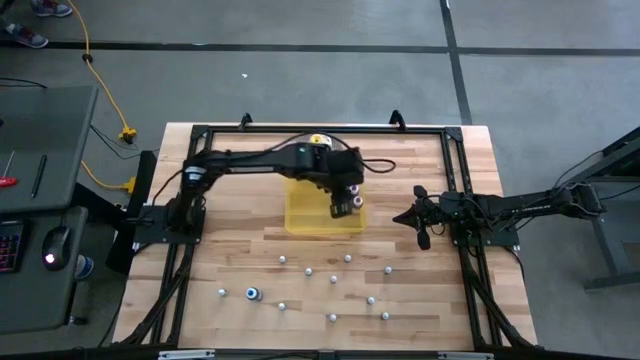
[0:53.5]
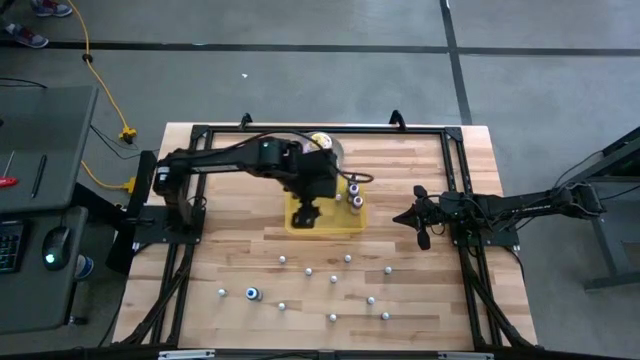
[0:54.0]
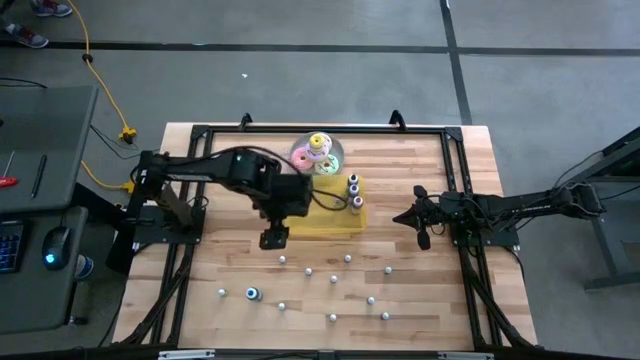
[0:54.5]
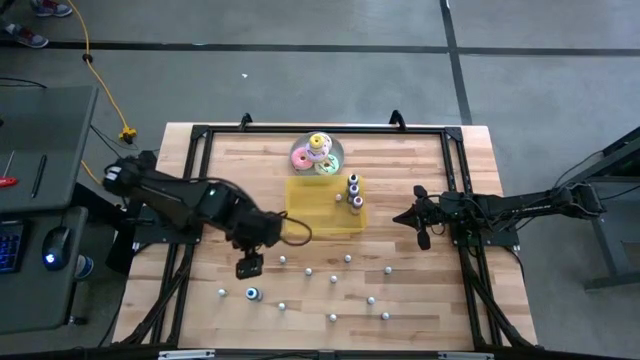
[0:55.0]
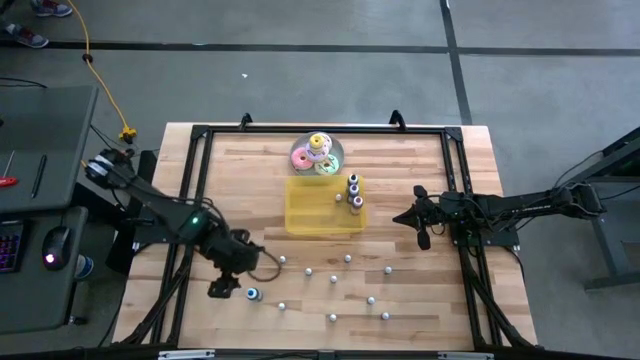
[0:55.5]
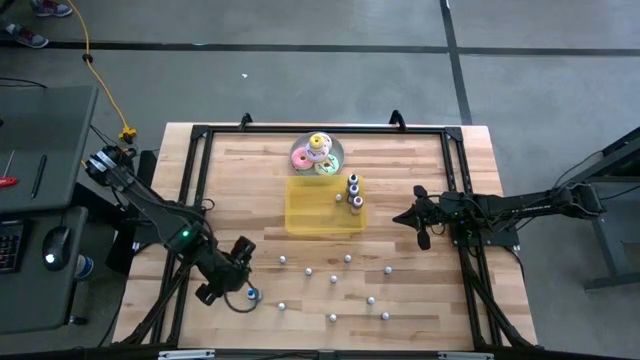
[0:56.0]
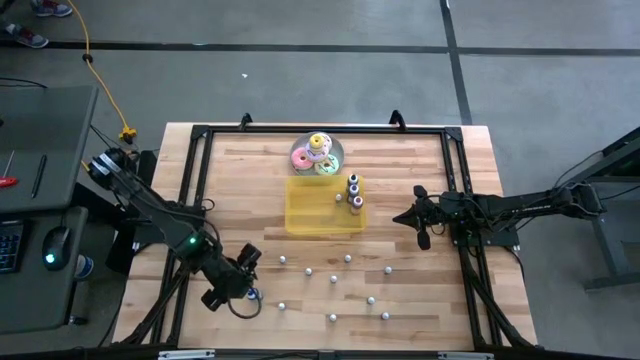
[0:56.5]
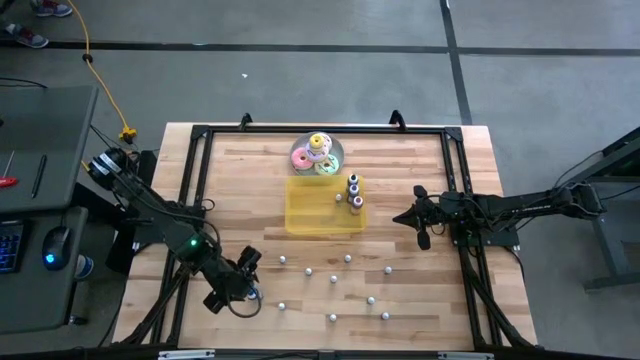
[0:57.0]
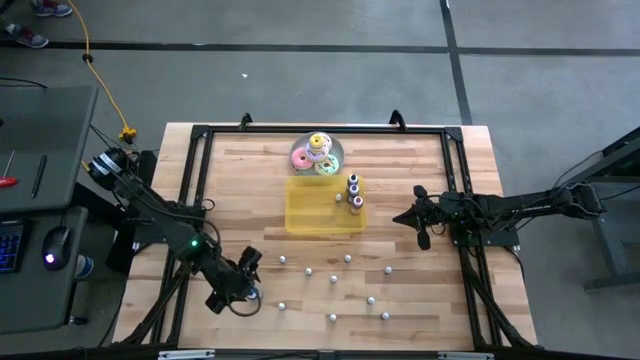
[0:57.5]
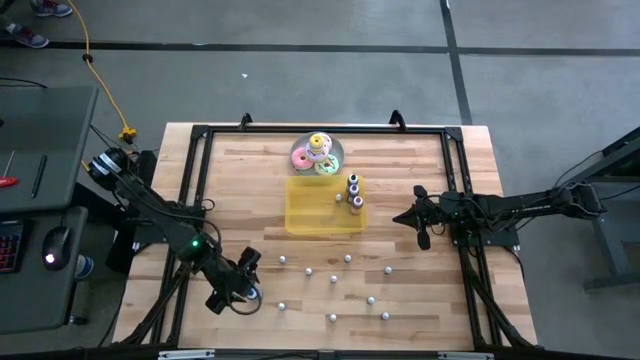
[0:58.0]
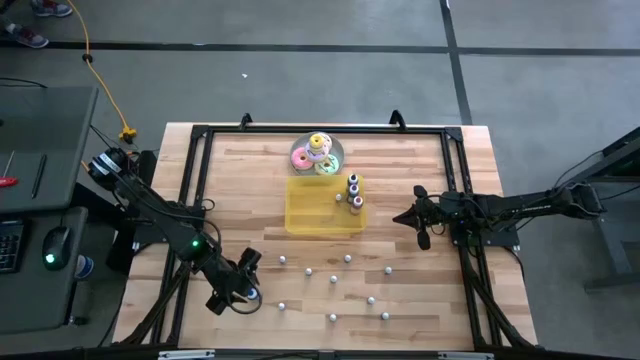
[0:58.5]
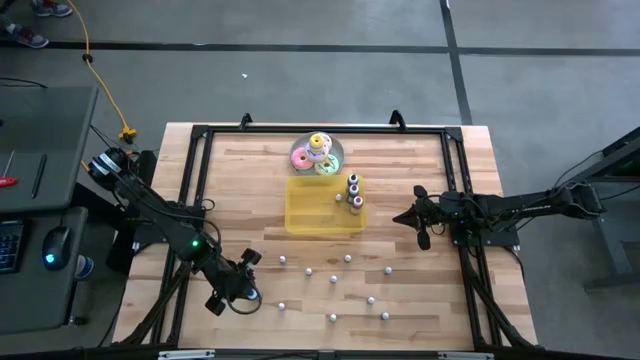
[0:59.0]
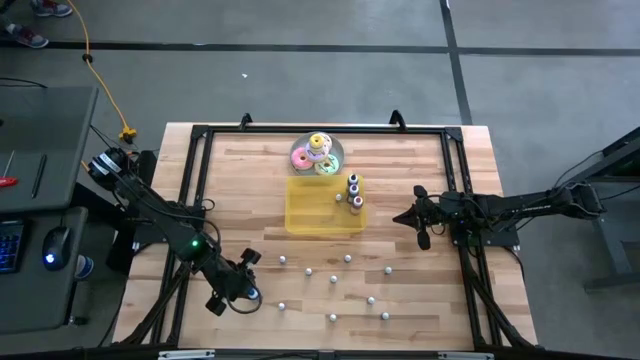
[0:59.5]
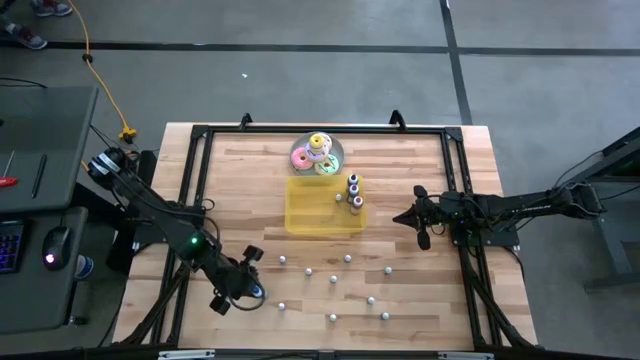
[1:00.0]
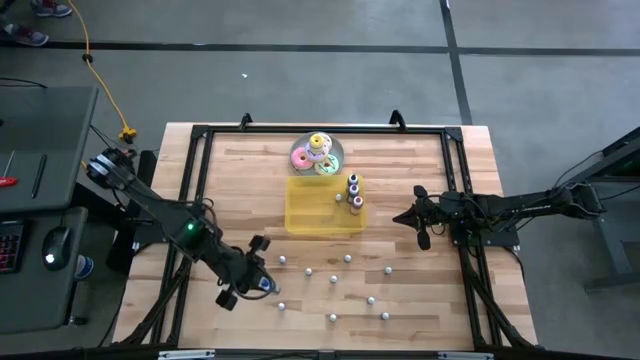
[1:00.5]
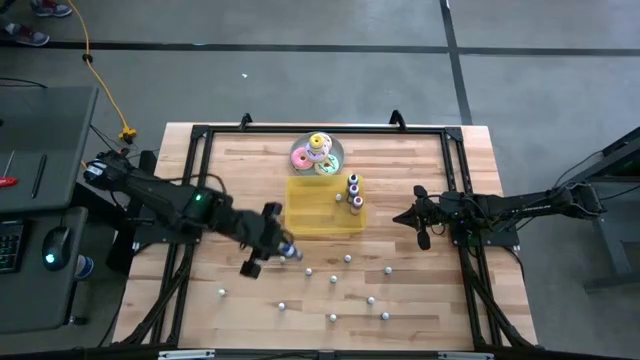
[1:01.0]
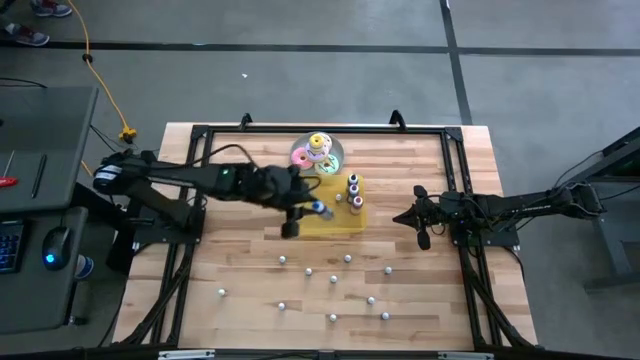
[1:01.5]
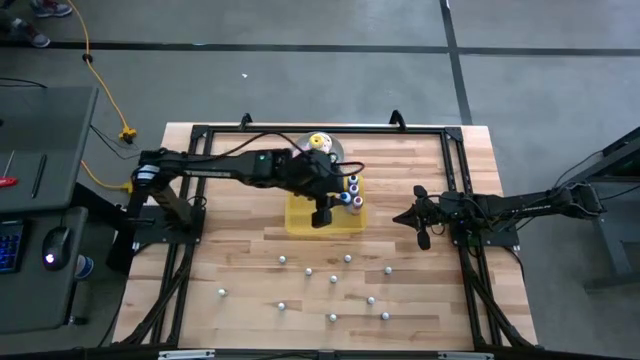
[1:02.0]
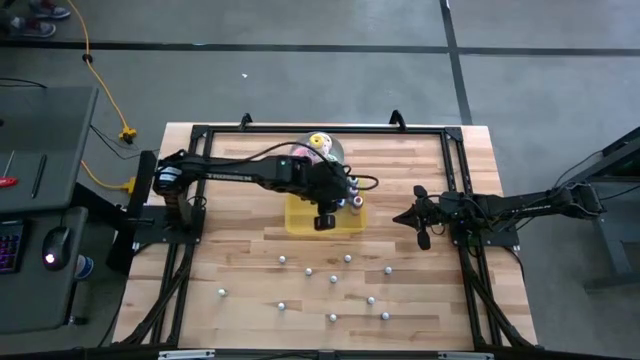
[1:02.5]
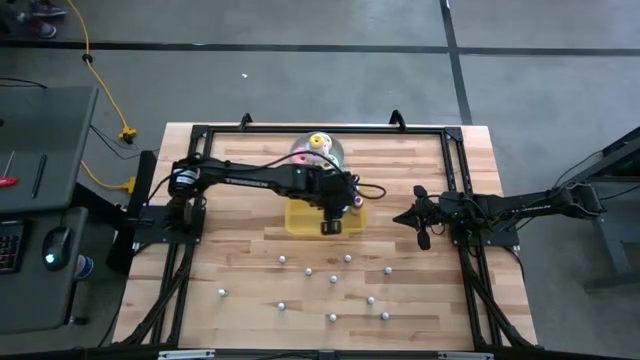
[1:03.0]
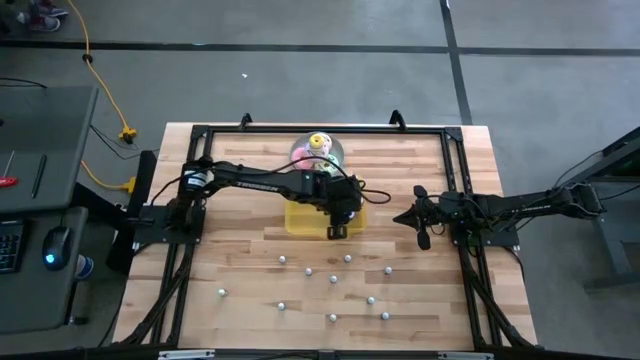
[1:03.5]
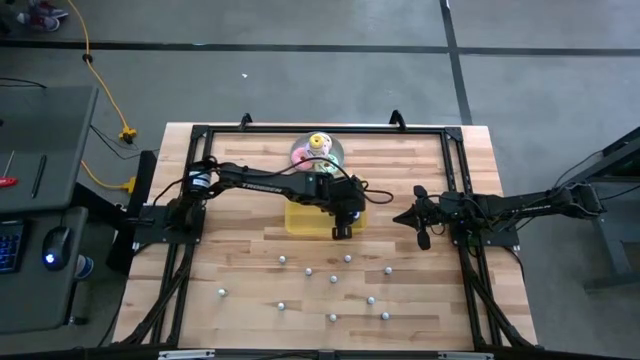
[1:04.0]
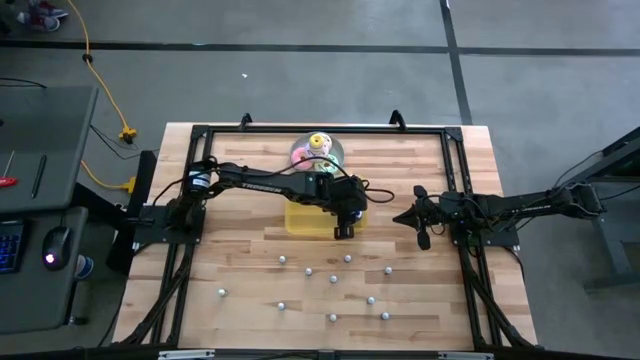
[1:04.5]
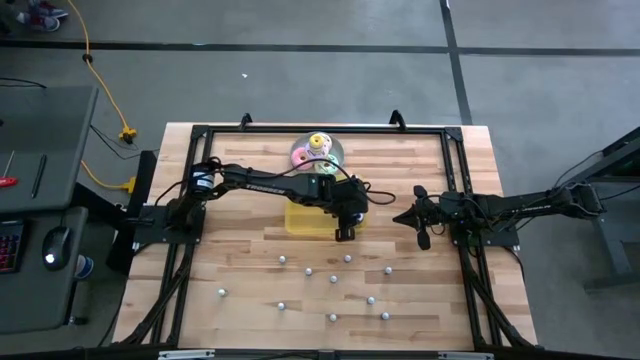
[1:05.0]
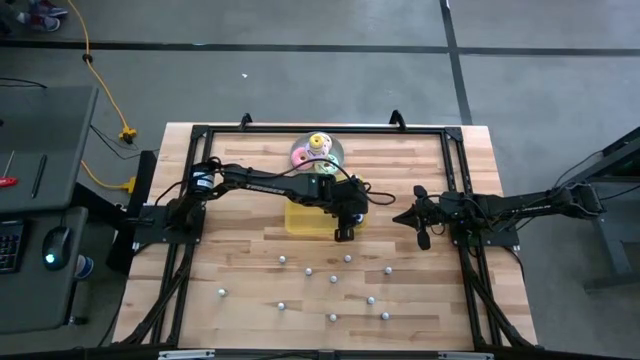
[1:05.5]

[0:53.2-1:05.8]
Task: Pick & Place food coloring
Put the large blue food coloring bottle into the yellow container

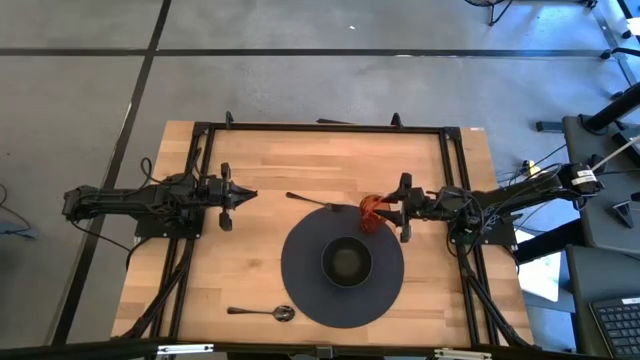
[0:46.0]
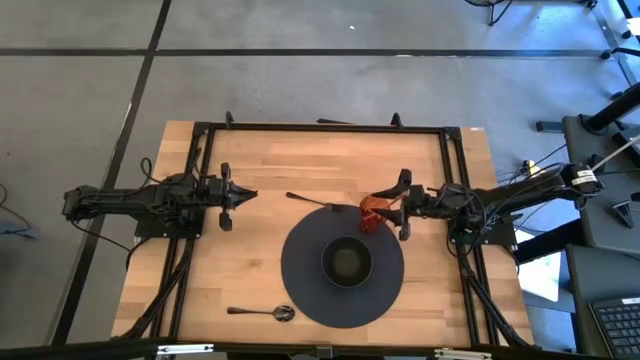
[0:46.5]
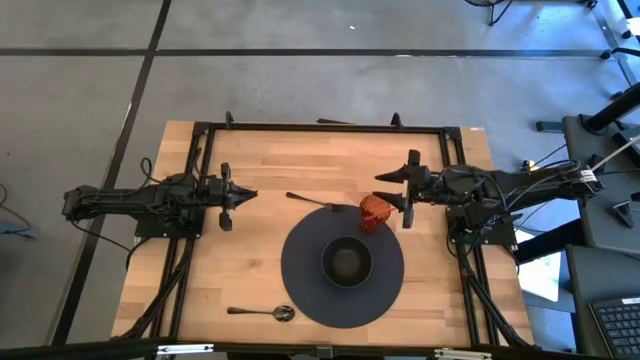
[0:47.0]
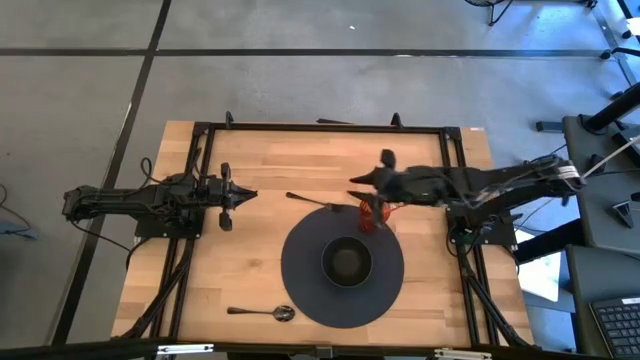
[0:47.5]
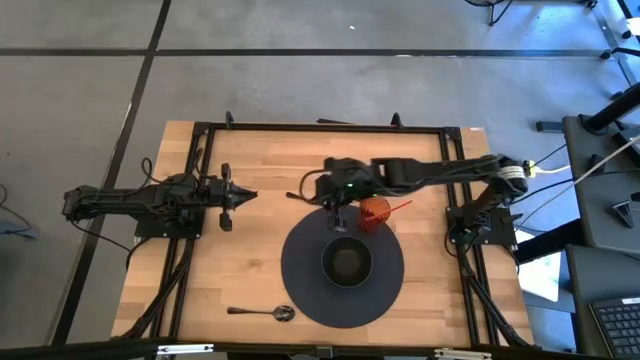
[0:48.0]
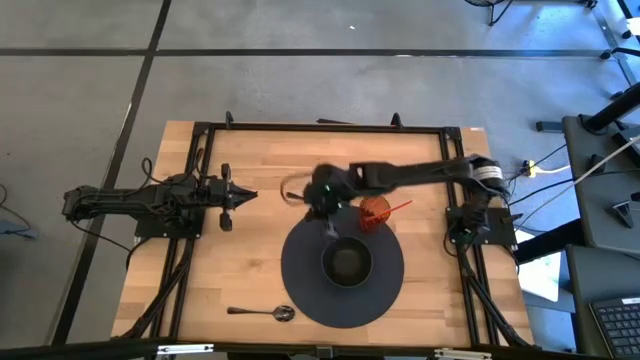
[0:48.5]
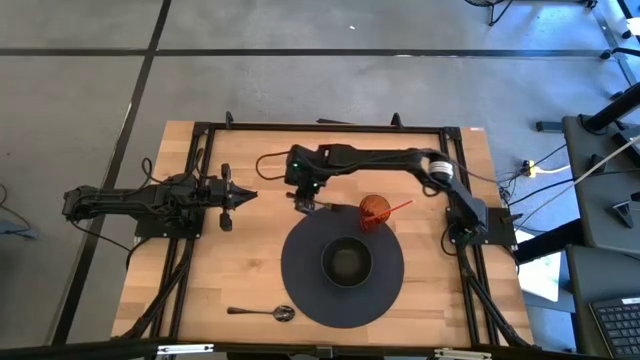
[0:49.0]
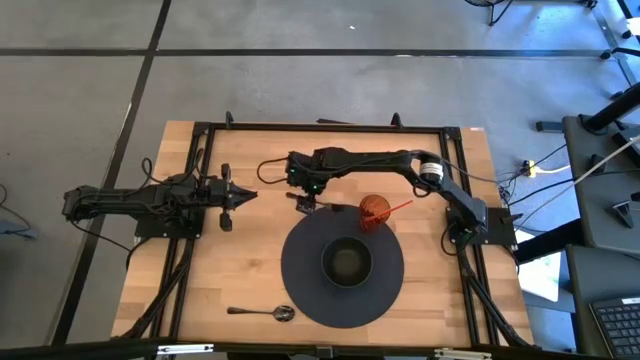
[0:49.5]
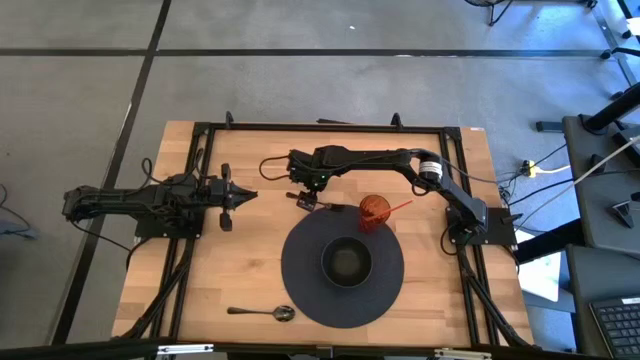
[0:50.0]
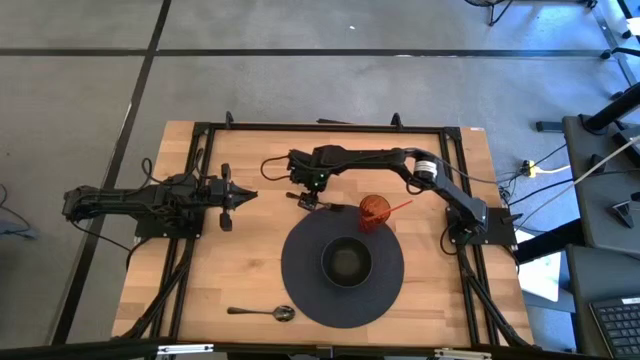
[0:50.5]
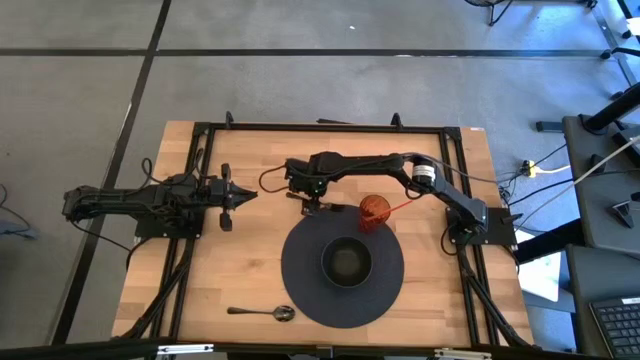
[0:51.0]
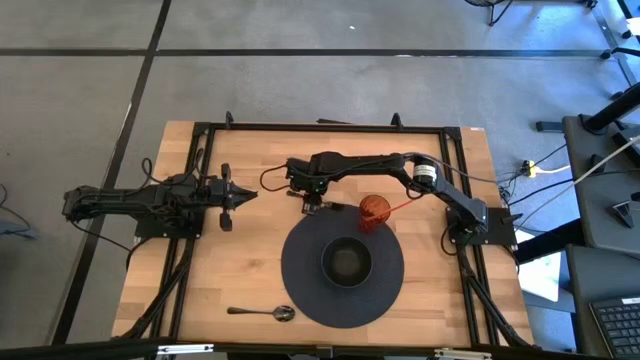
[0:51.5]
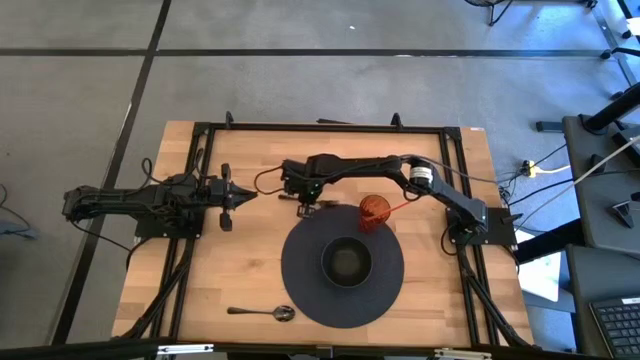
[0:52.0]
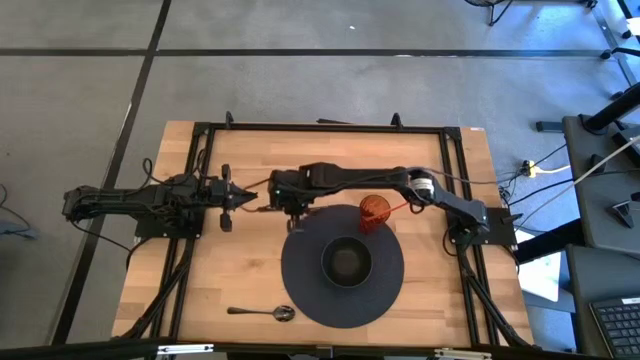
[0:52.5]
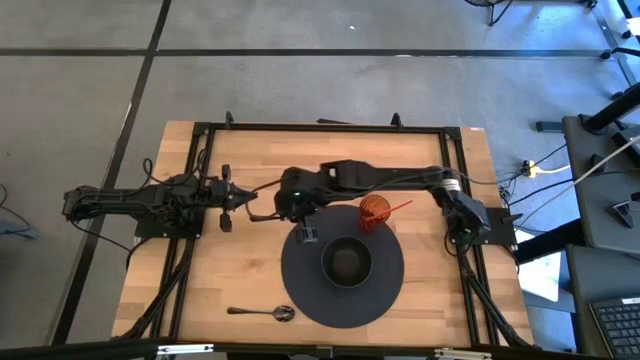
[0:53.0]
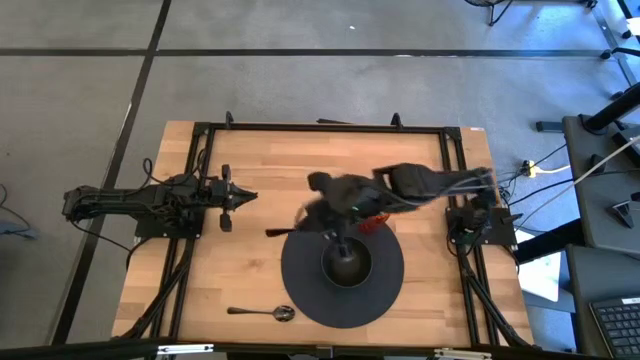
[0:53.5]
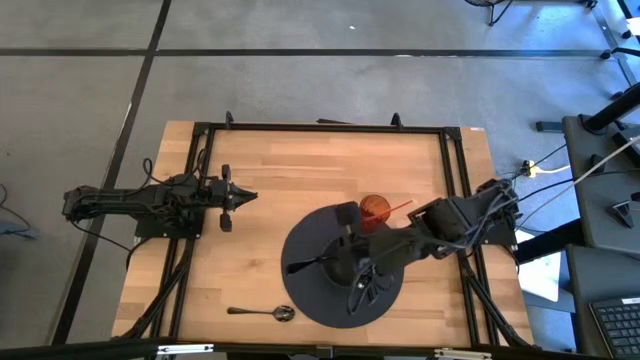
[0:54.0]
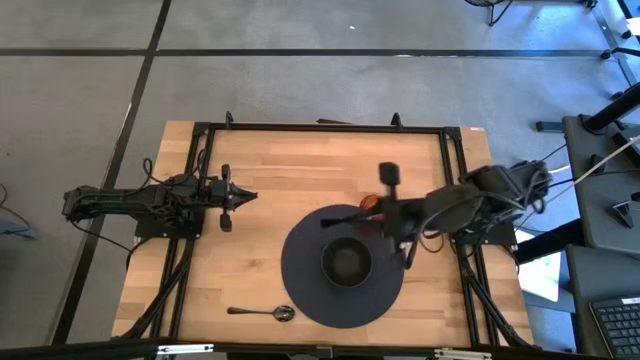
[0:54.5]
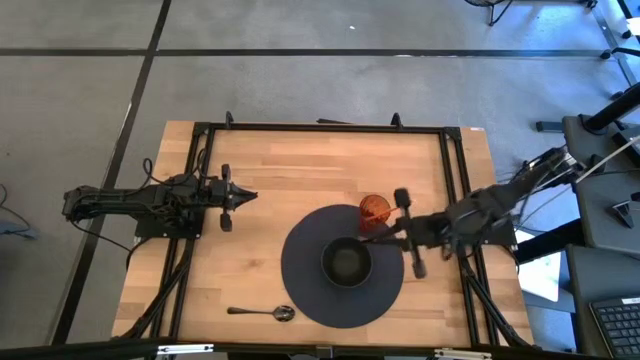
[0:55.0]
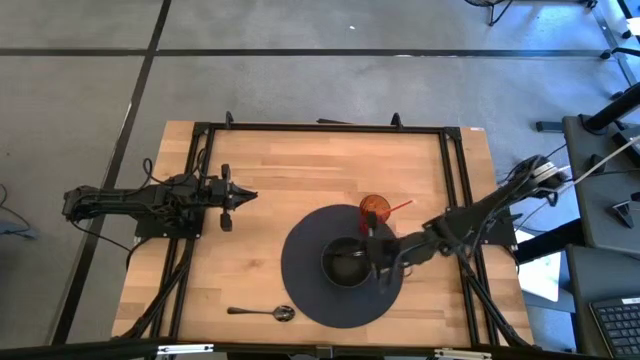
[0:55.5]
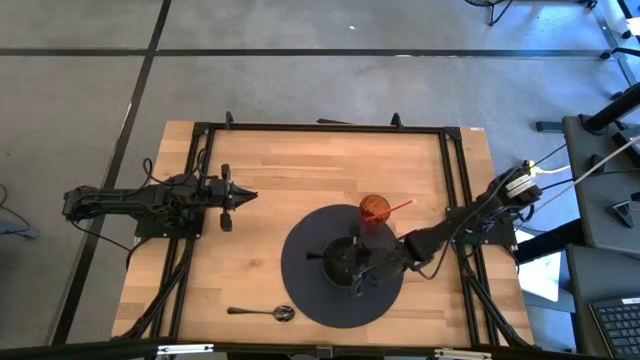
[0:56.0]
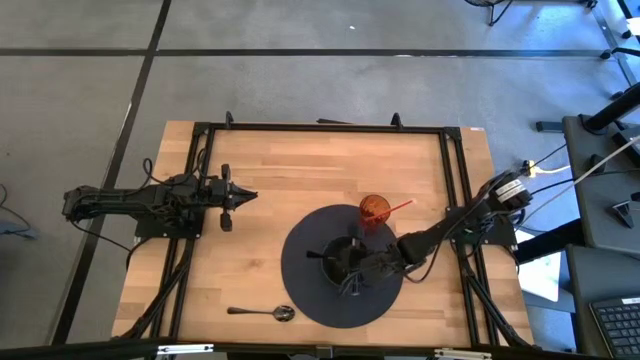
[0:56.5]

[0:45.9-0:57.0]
Task: Pick & Place Utensil
Put the black fork into the black bowl
